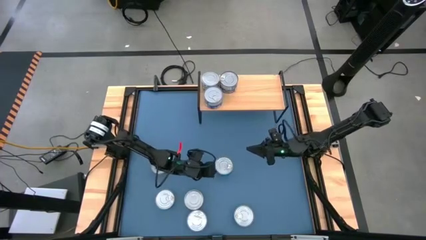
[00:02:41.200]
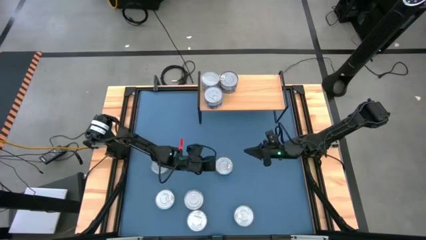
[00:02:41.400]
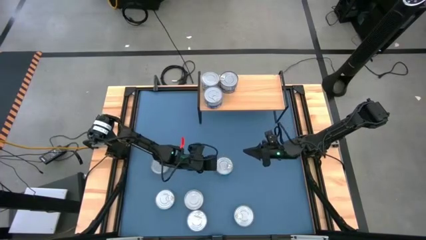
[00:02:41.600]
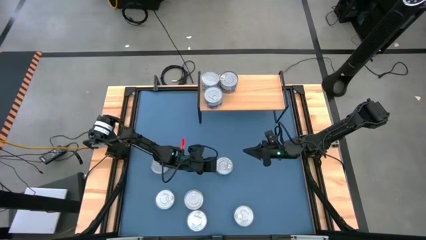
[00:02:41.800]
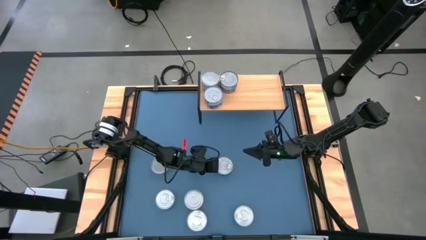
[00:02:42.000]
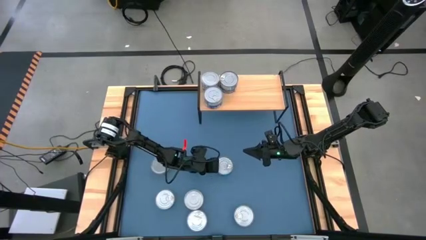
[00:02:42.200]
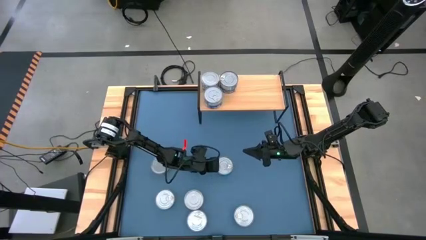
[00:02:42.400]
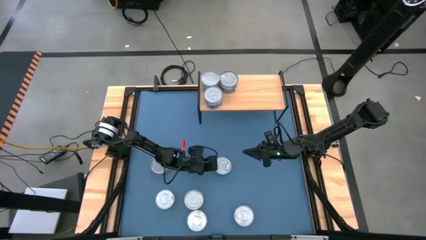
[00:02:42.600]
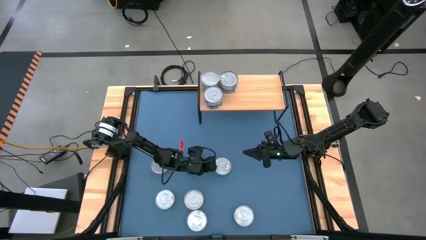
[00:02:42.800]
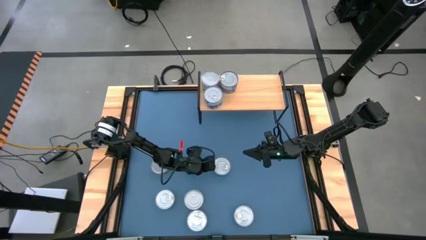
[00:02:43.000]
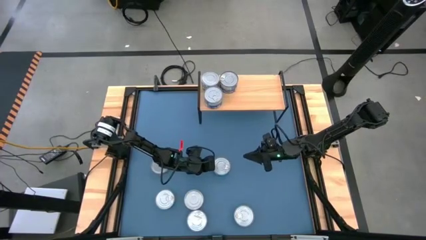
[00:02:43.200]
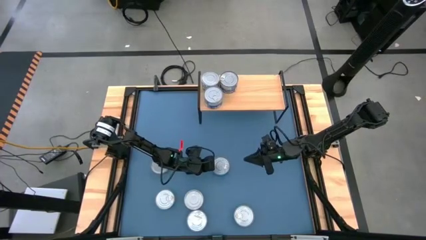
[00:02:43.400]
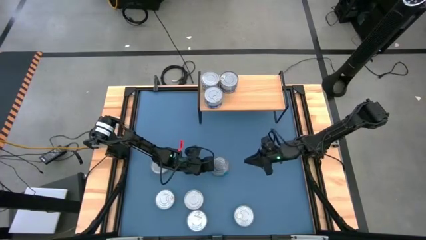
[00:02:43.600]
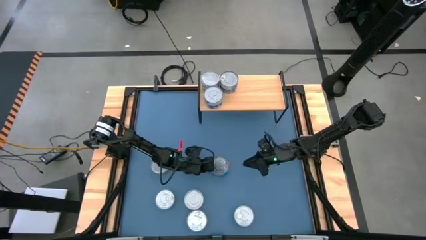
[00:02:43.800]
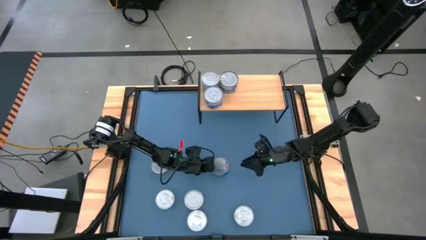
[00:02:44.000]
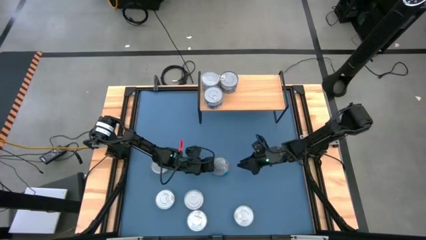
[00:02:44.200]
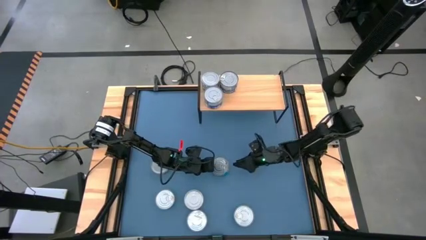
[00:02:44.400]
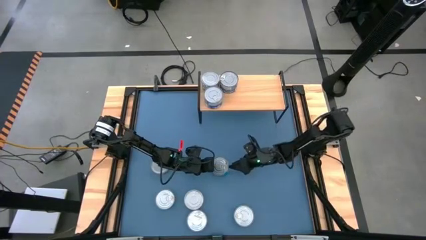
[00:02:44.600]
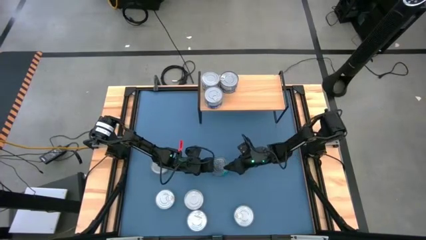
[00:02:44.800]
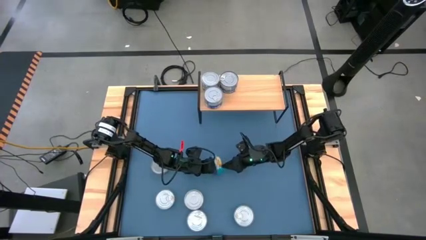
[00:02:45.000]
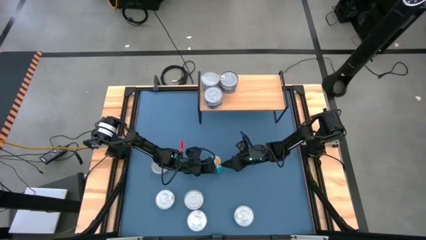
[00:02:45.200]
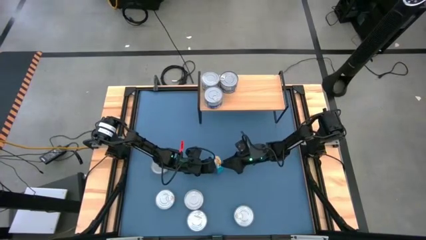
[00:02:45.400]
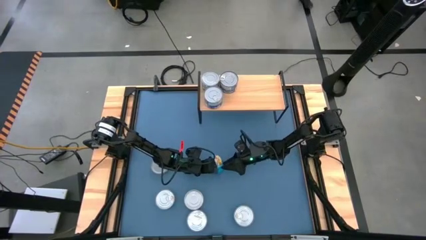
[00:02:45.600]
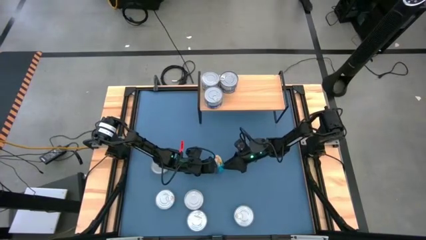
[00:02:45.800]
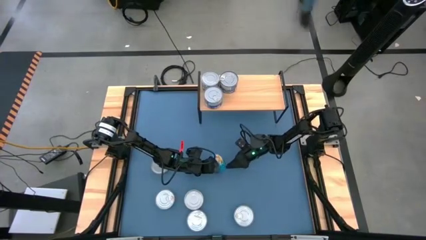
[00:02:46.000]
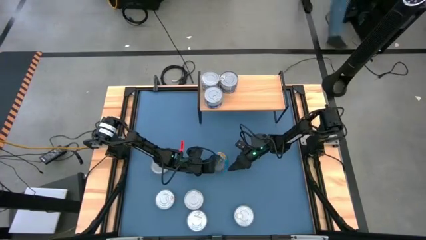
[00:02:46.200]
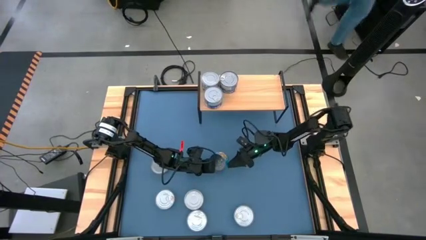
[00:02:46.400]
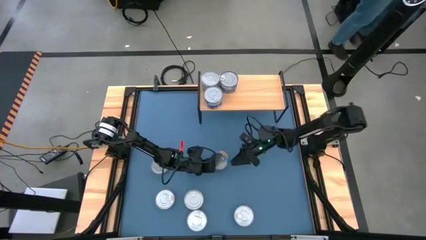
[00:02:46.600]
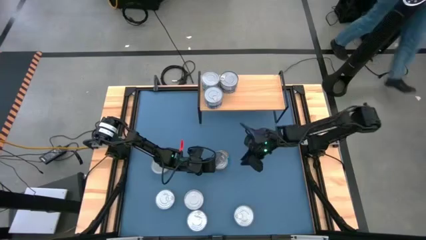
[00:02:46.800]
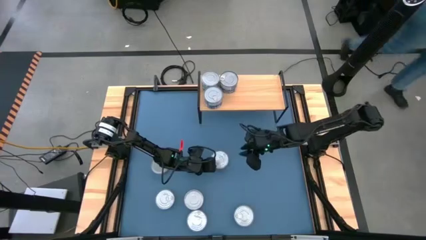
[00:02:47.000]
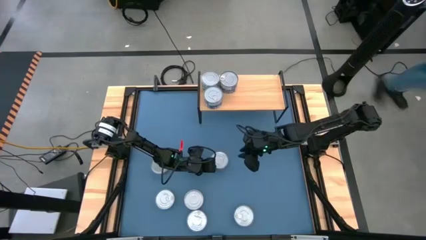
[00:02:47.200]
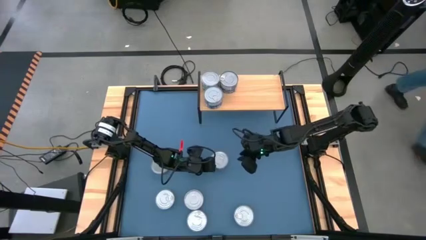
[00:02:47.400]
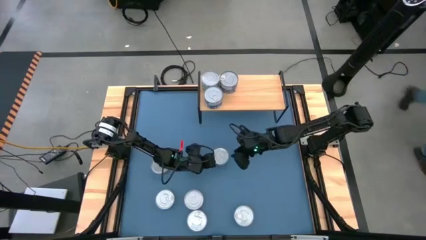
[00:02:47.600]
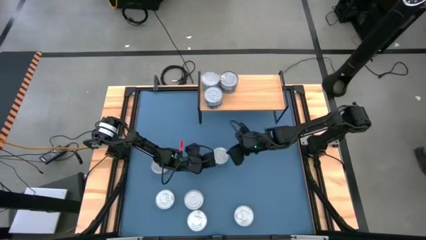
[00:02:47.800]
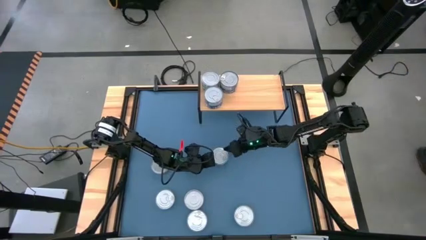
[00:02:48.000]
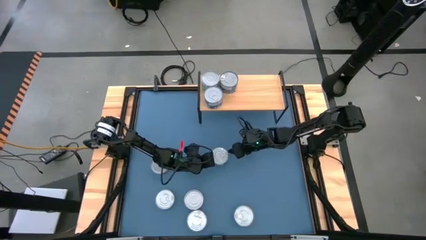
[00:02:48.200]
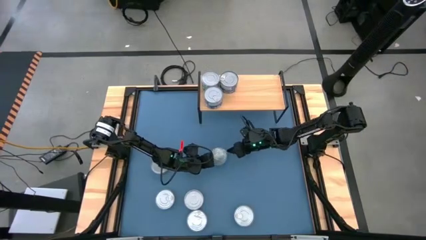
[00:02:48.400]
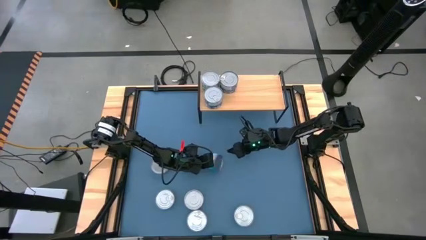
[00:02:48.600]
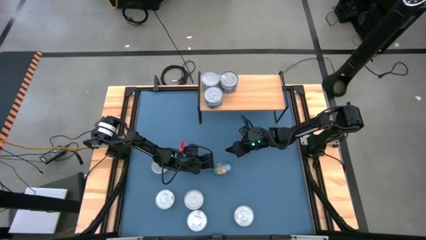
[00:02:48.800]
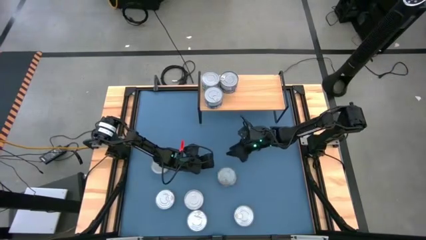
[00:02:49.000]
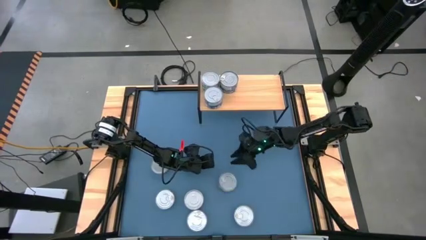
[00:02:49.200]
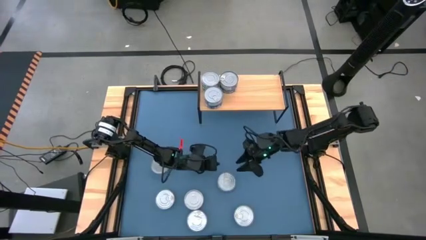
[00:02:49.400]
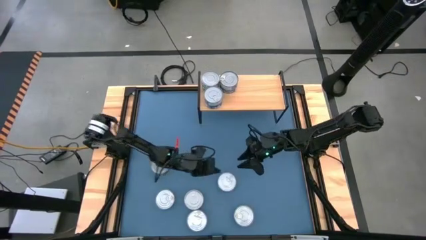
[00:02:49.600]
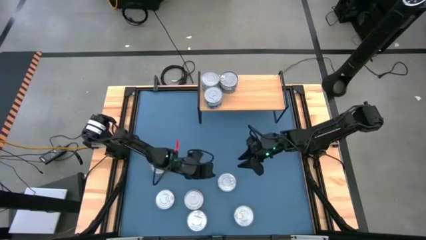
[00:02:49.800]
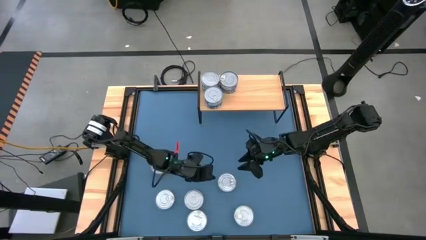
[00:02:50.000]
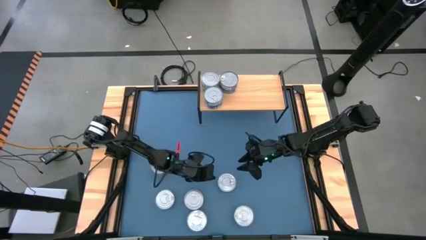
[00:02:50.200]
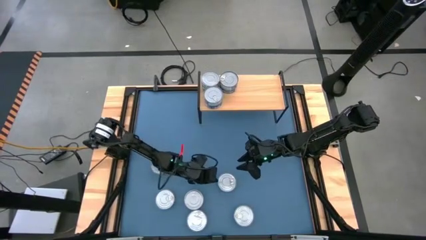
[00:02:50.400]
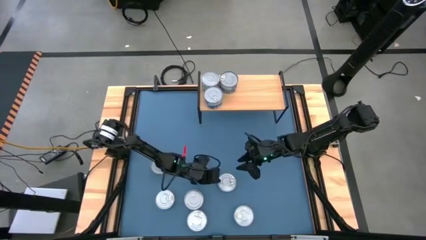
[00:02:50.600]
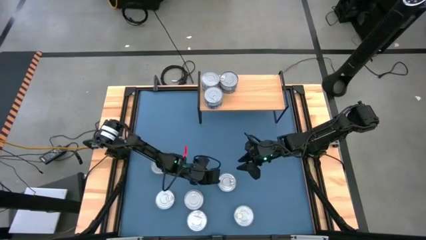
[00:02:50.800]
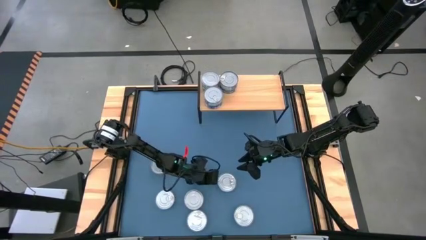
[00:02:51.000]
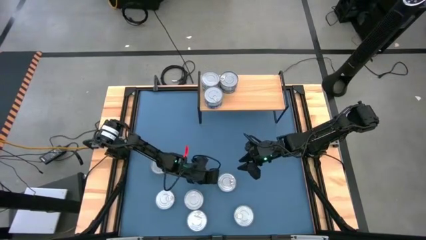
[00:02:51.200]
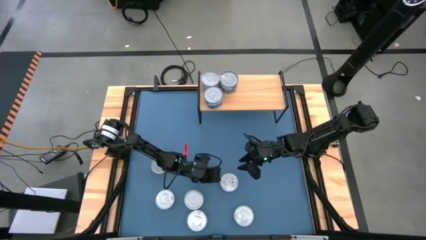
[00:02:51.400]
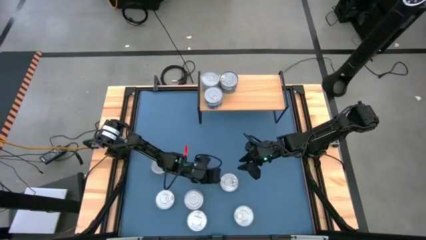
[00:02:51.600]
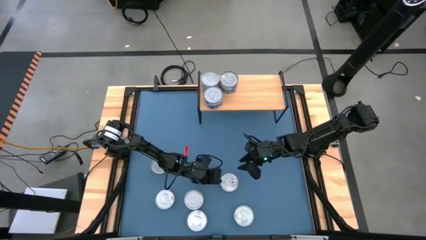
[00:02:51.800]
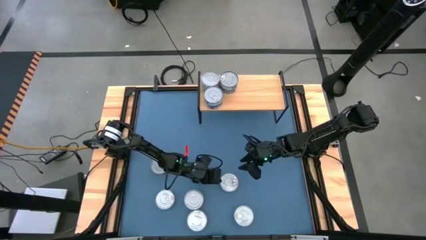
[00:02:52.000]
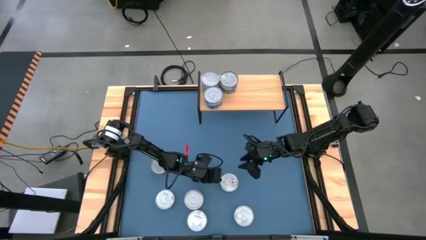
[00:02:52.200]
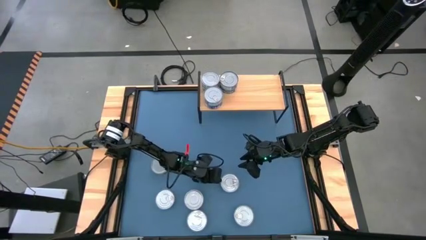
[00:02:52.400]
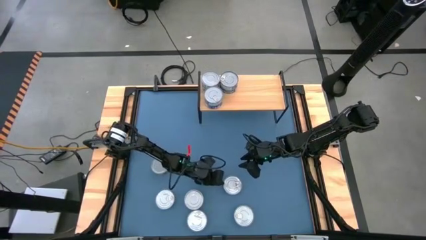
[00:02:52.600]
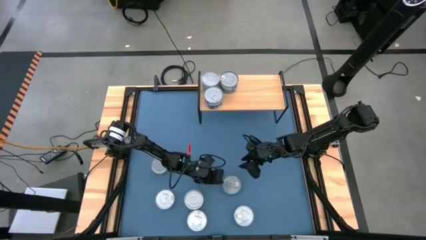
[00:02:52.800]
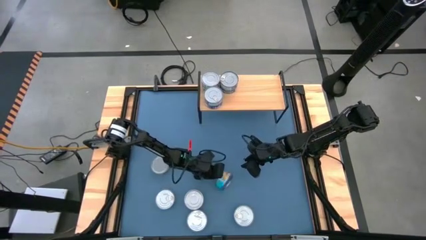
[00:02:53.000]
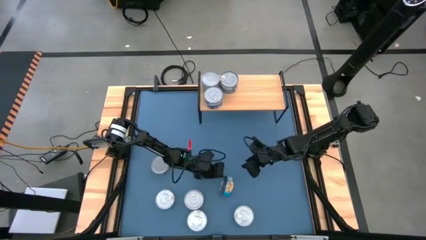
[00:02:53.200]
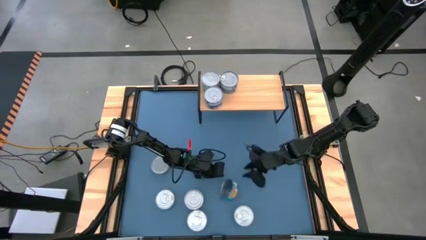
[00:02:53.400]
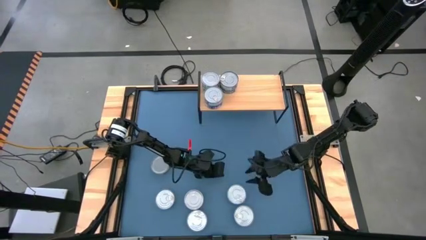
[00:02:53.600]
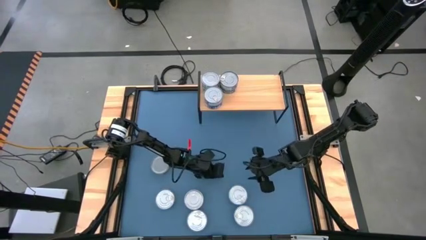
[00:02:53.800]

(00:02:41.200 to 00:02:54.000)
Task: Stack canned seafood by type on shelf
Put the yellow blue tuna can on the shelf

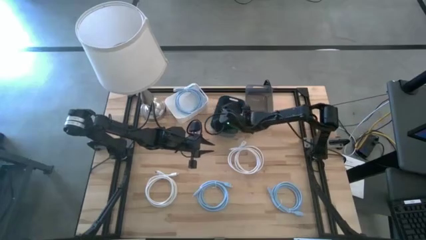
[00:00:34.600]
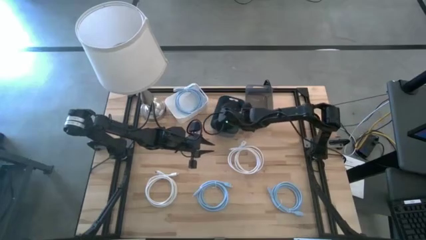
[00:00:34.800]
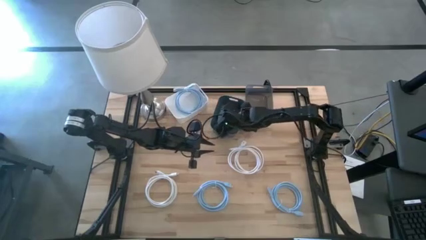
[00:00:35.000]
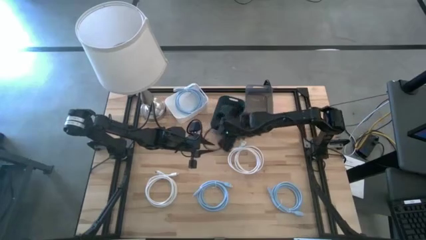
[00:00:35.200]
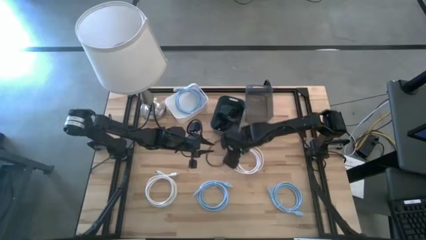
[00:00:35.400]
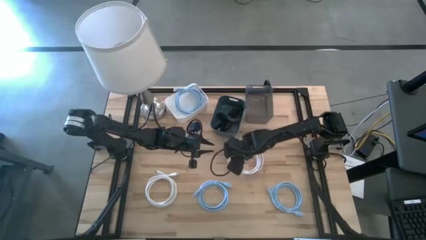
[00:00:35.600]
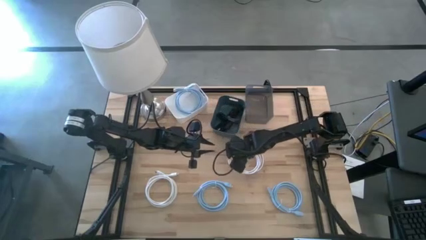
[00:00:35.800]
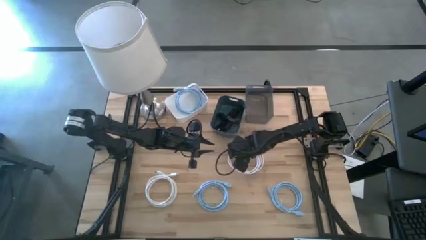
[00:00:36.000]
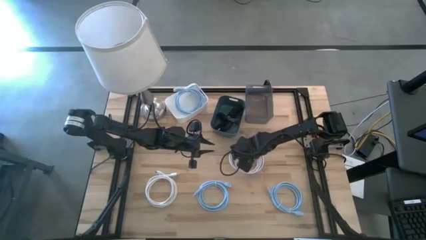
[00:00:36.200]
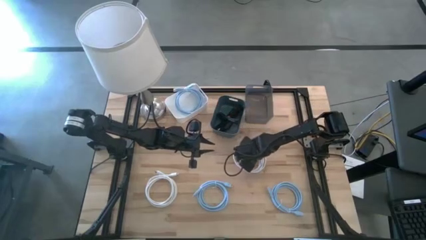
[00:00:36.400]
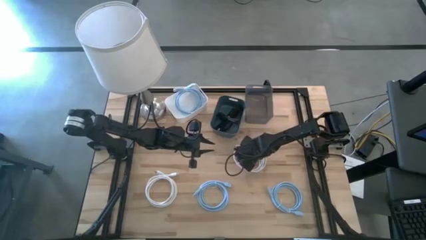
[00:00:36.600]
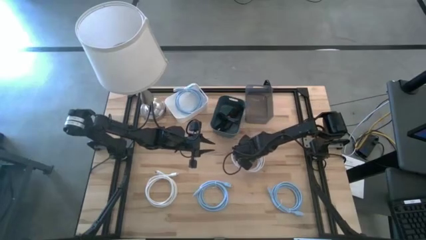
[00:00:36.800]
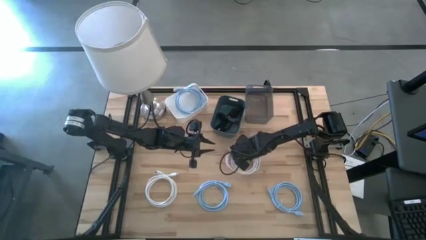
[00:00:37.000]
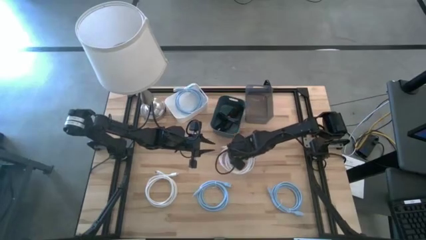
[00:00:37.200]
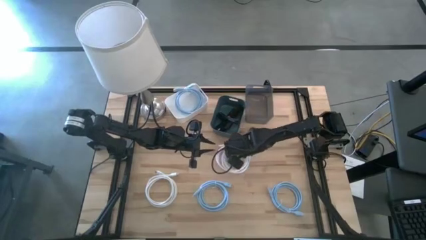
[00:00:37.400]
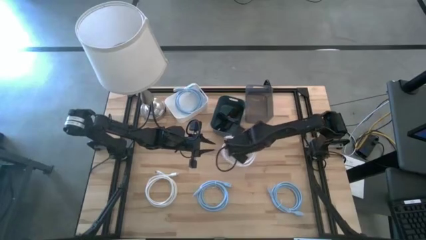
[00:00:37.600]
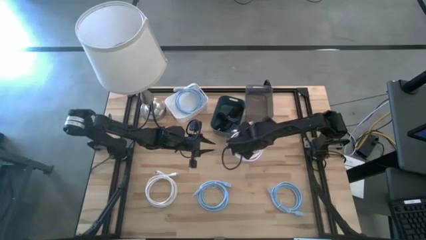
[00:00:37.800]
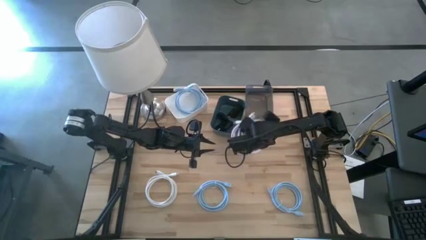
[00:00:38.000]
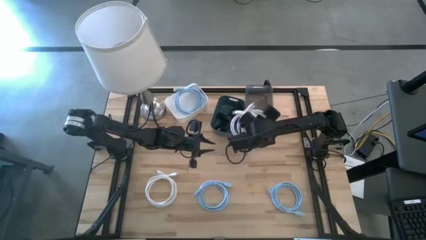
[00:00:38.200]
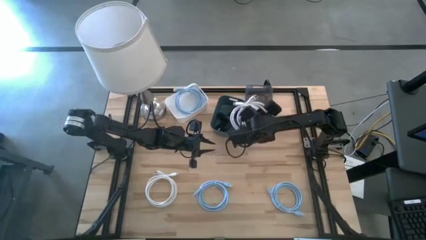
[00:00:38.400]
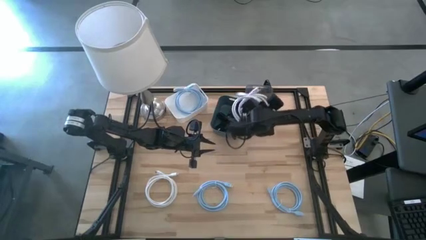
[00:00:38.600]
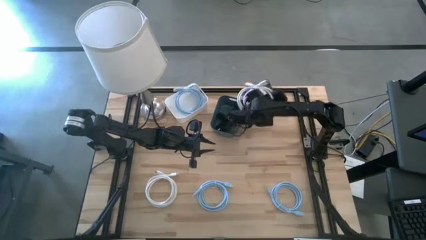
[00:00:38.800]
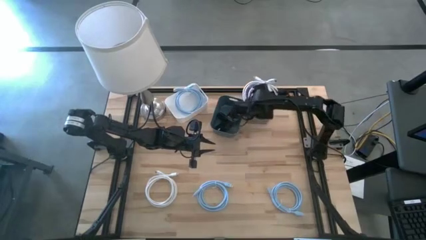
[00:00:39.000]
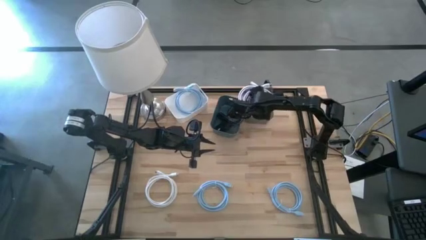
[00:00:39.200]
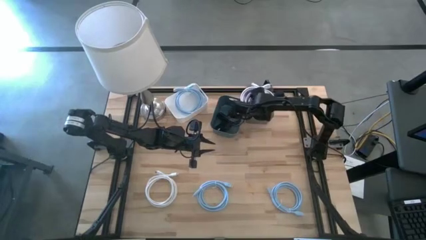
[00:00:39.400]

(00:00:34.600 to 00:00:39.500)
Task: Pick & Place USB Port
Put the top white cable into the black bin
